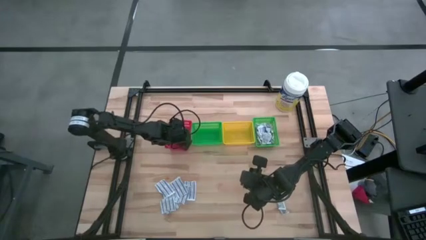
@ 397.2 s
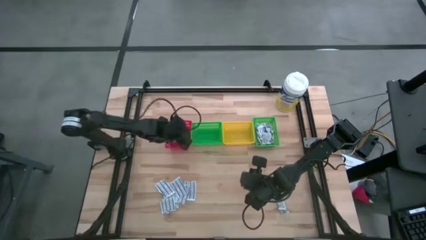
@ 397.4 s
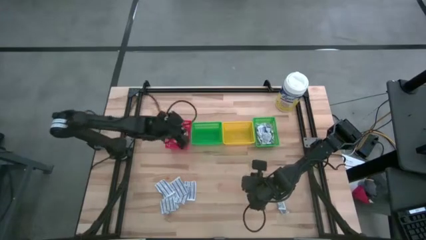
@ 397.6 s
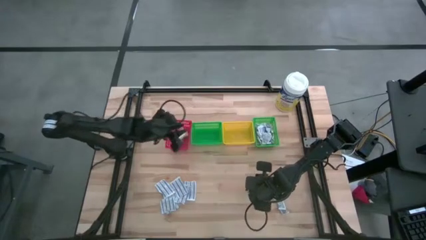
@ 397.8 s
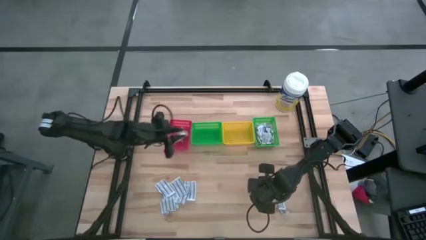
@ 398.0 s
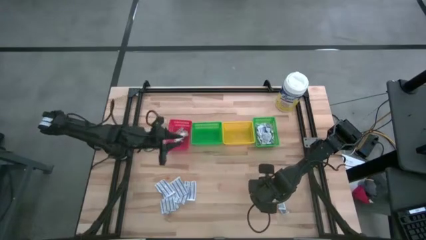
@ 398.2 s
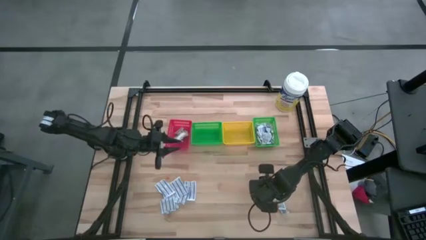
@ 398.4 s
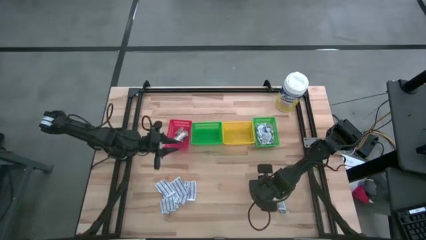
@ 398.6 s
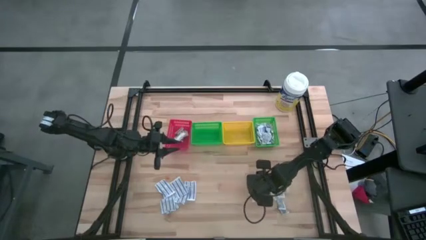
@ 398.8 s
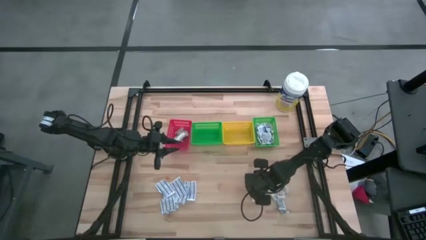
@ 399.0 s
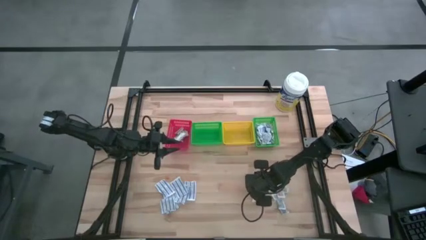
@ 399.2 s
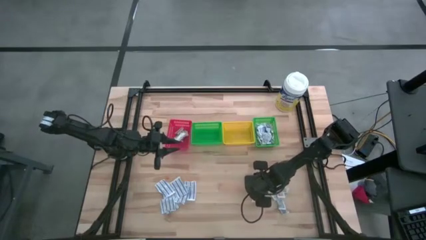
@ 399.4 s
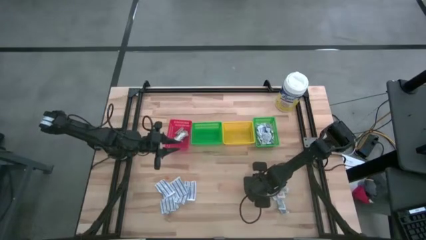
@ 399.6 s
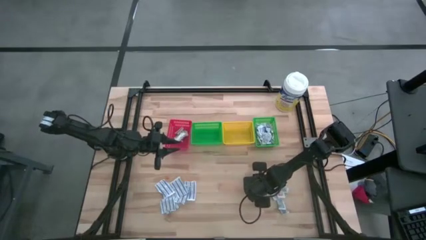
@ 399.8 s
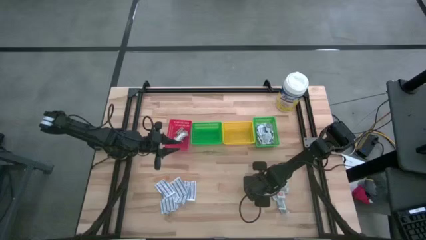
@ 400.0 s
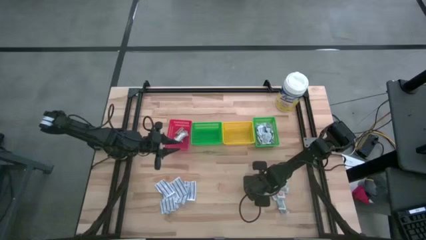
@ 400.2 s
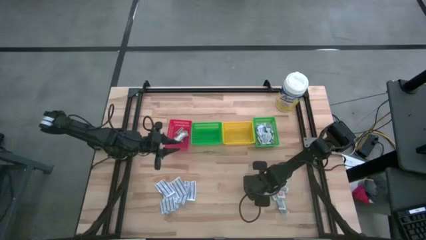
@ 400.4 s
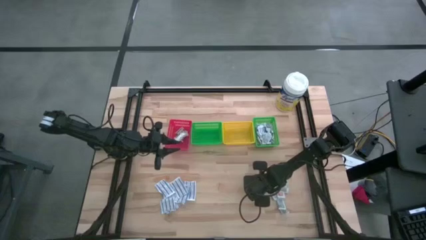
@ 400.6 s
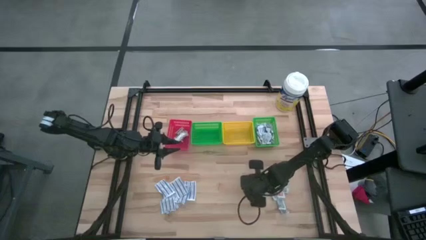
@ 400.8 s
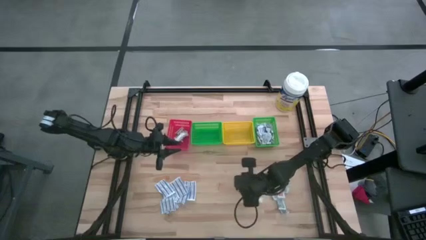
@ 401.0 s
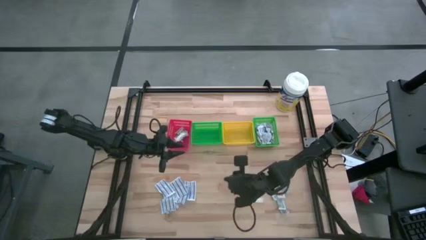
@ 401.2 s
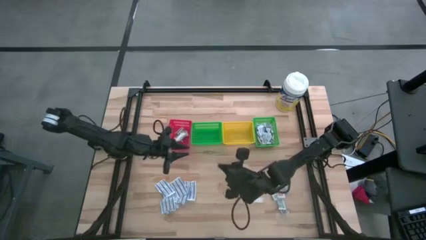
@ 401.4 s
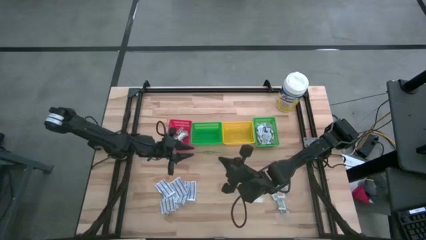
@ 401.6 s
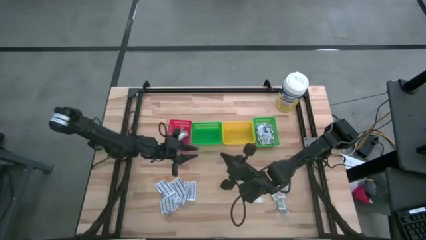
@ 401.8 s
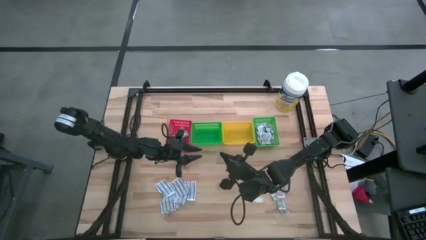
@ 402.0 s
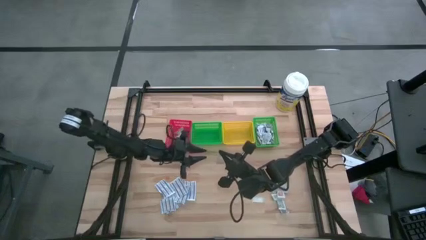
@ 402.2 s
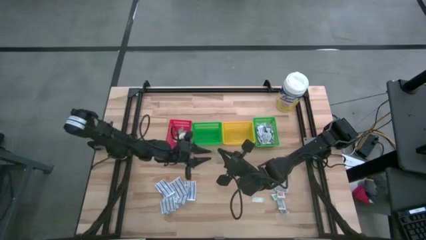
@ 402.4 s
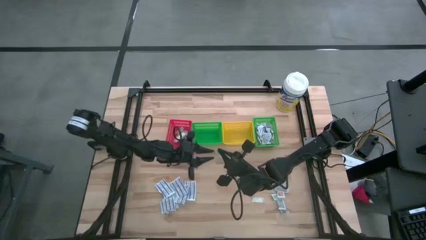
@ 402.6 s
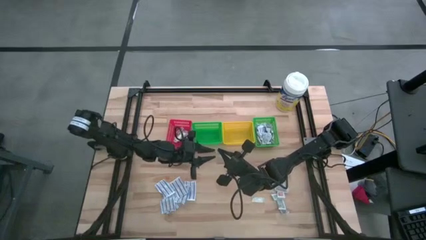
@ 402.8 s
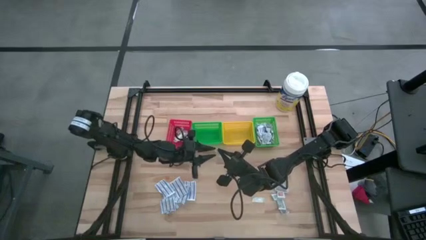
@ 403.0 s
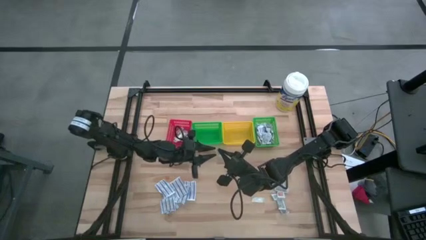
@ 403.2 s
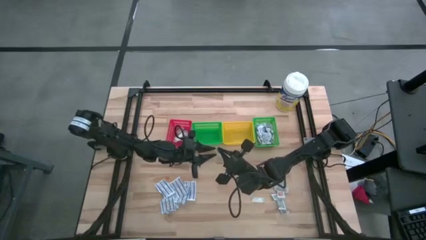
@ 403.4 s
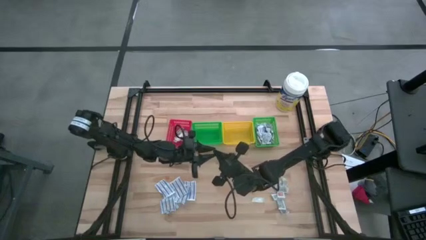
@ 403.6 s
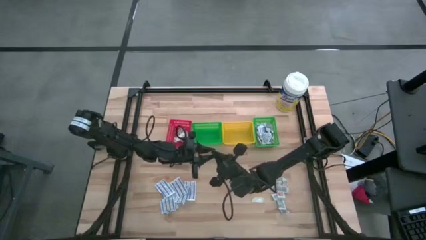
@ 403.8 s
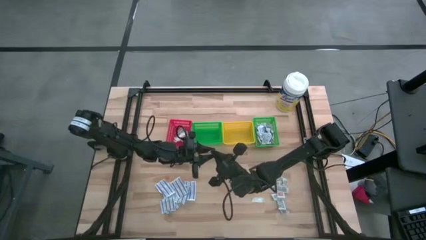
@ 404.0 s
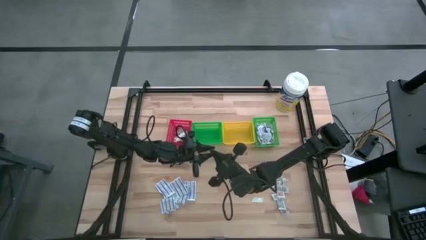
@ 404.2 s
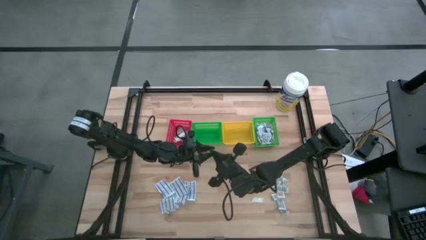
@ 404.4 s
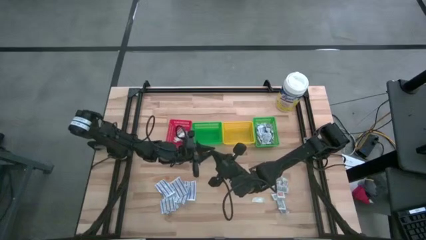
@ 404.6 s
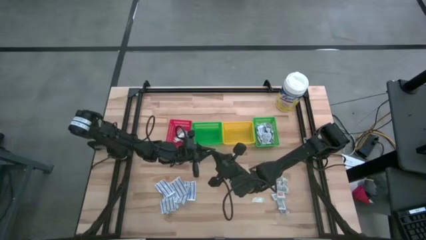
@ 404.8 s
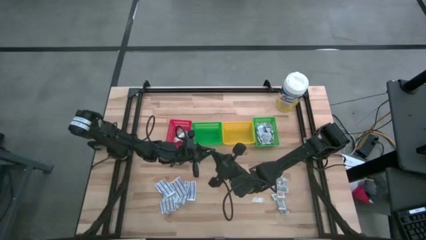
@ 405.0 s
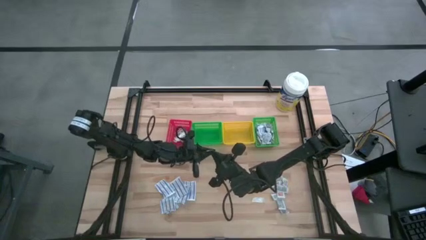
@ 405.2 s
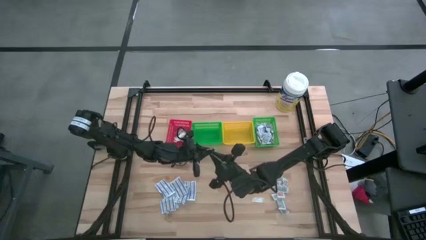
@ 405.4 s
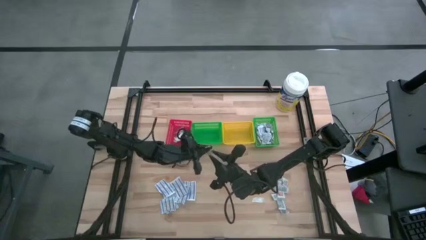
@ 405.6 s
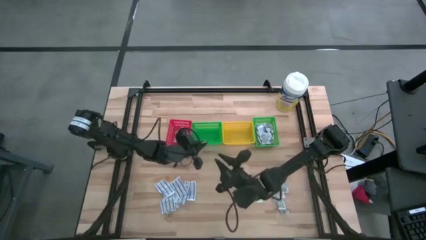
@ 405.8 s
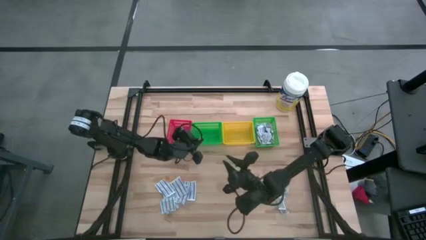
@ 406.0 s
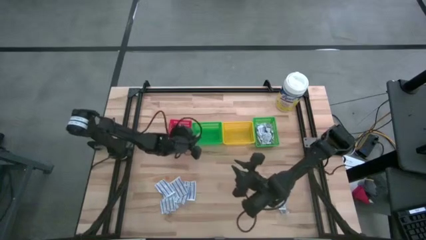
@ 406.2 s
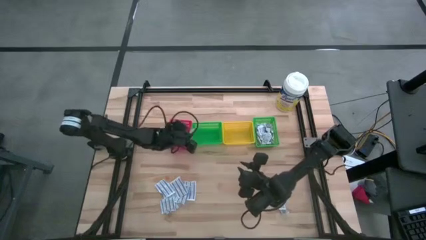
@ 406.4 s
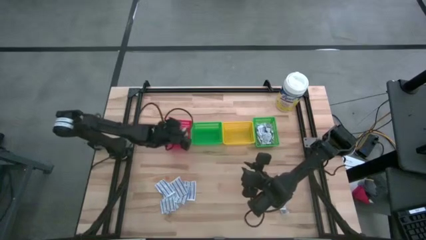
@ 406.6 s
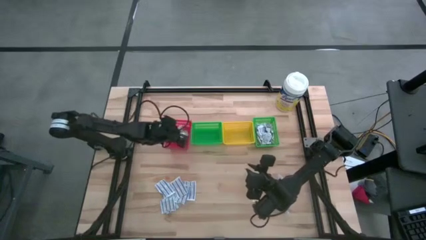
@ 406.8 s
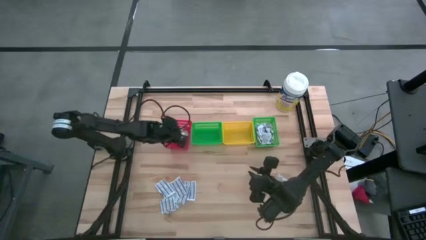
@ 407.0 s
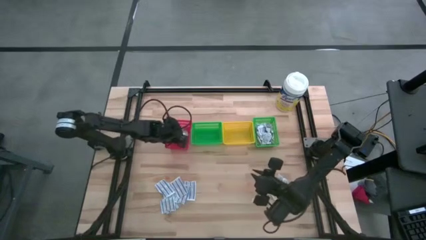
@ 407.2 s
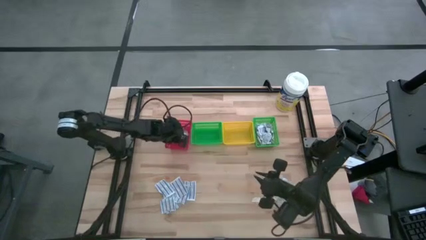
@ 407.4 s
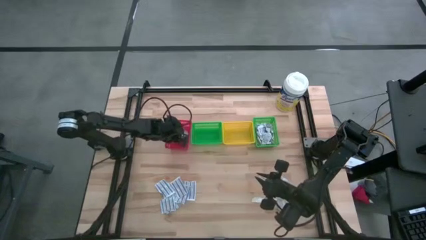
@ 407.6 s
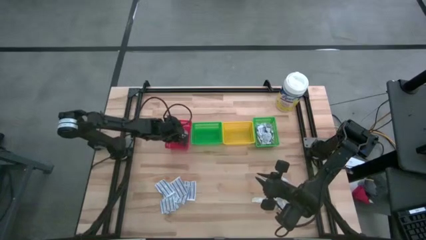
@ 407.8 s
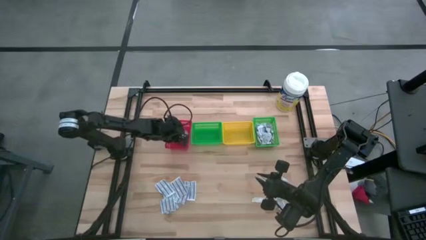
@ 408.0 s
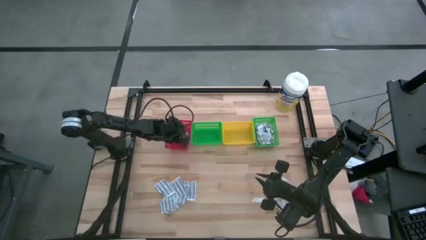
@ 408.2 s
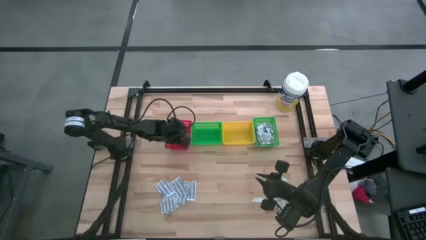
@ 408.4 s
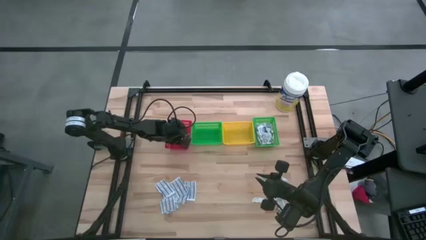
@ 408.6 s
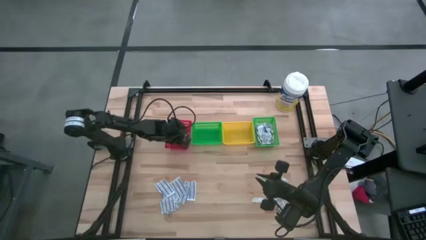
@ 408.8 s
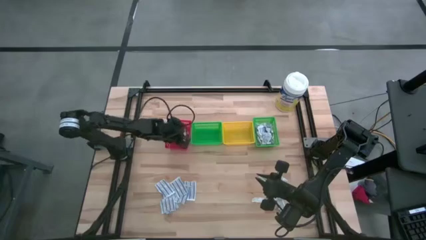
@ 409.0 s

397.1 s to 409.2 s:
Task: Pick & Place First Aid Supplies
Put the green bandage into the red bin
